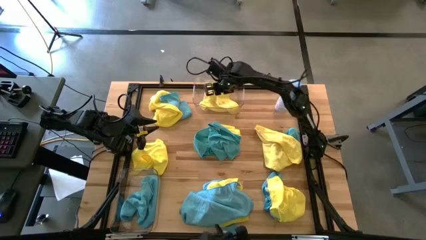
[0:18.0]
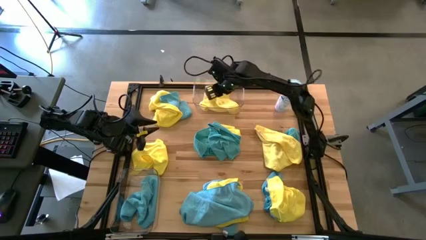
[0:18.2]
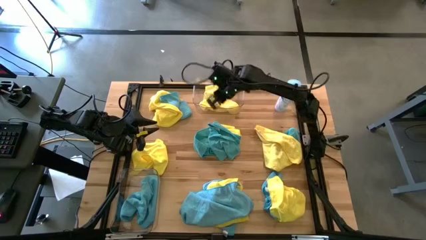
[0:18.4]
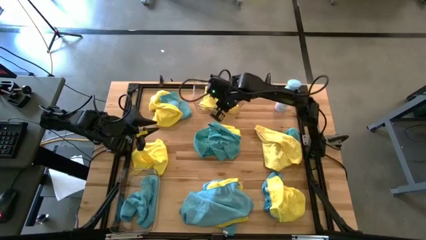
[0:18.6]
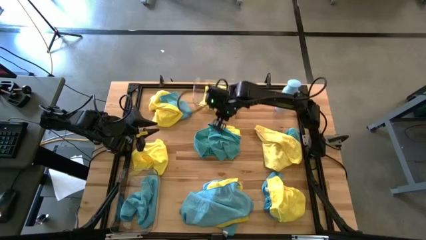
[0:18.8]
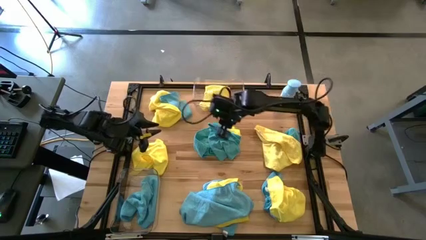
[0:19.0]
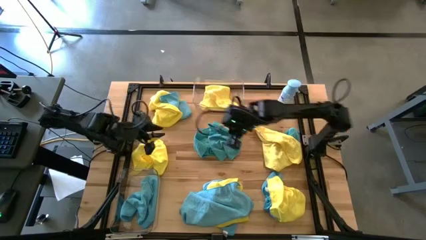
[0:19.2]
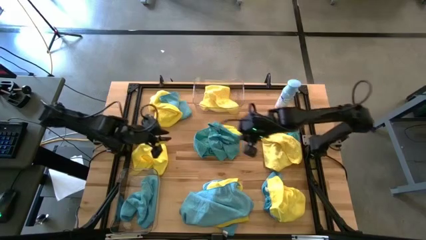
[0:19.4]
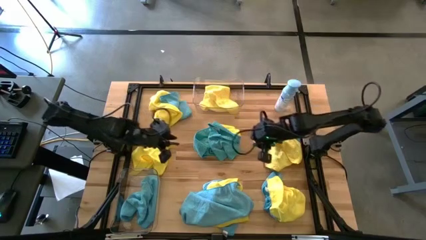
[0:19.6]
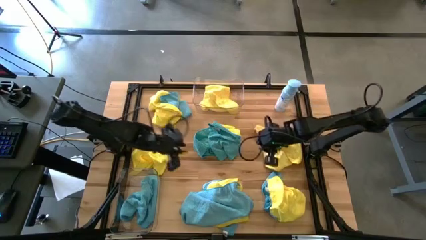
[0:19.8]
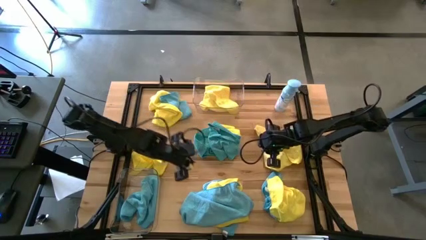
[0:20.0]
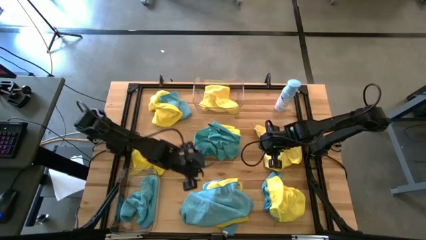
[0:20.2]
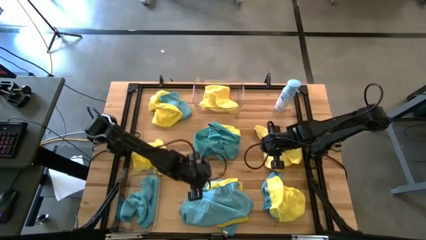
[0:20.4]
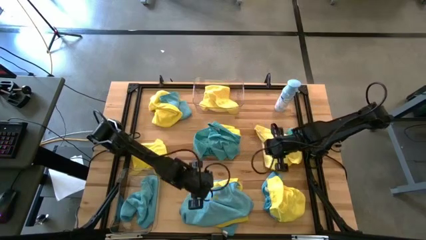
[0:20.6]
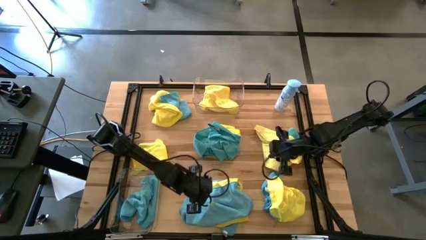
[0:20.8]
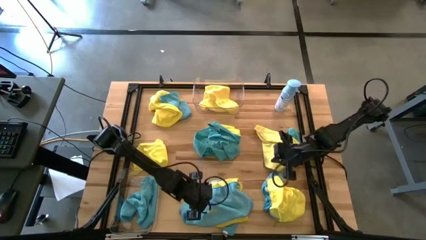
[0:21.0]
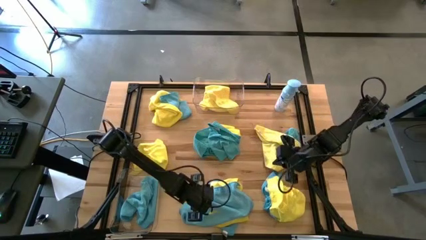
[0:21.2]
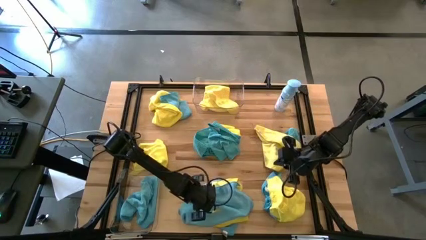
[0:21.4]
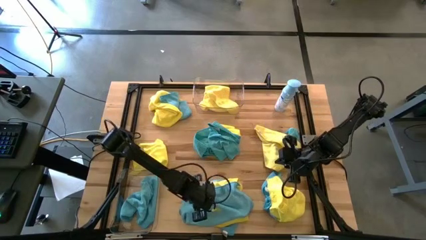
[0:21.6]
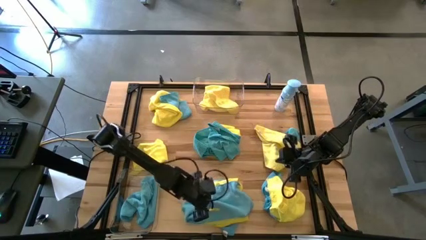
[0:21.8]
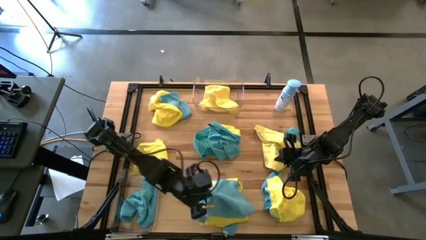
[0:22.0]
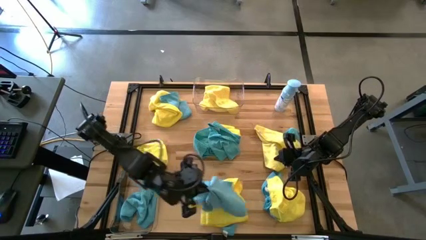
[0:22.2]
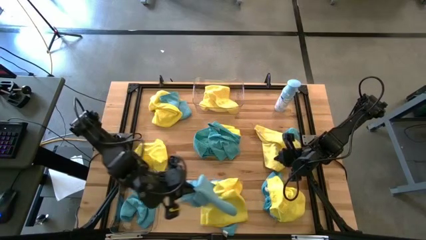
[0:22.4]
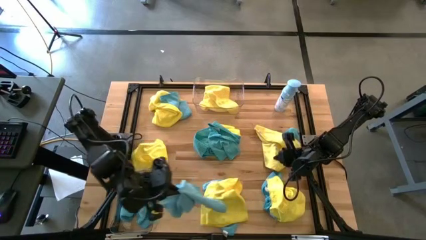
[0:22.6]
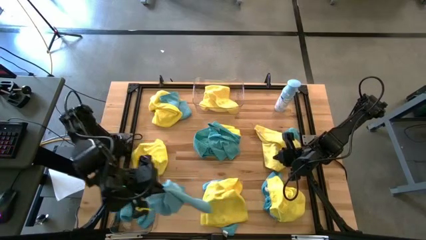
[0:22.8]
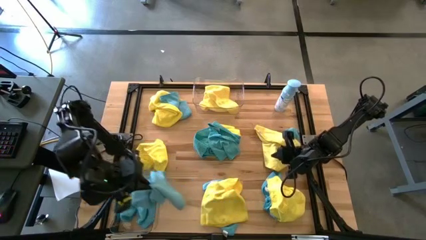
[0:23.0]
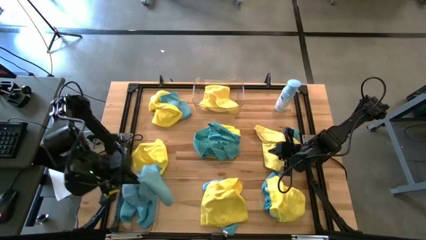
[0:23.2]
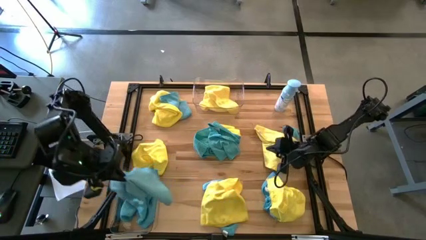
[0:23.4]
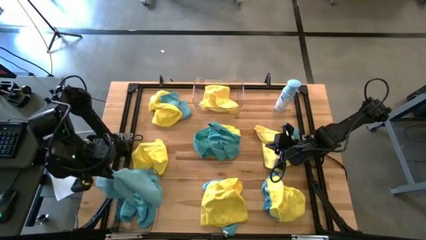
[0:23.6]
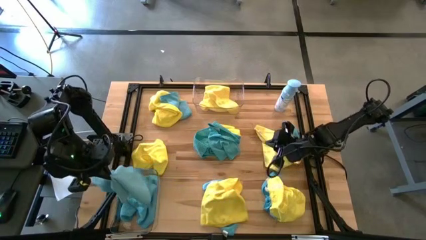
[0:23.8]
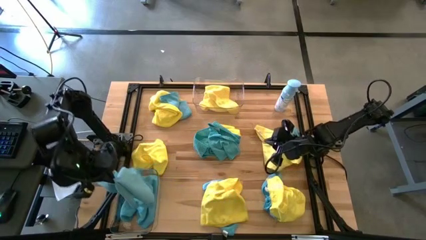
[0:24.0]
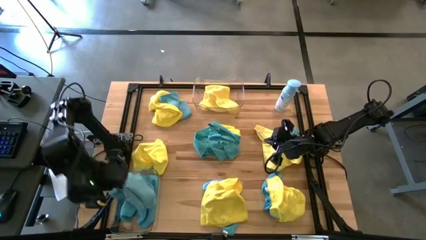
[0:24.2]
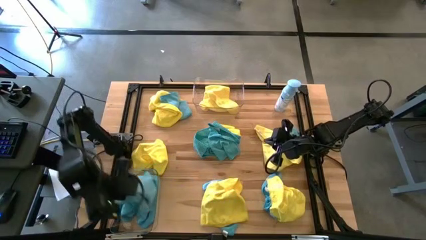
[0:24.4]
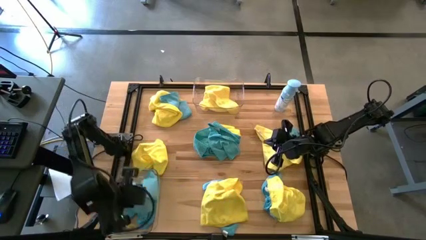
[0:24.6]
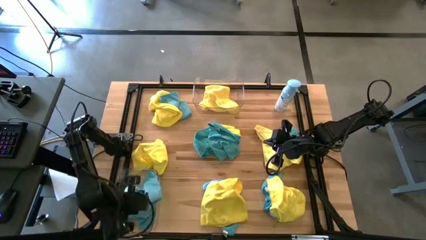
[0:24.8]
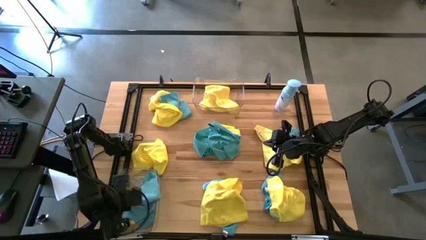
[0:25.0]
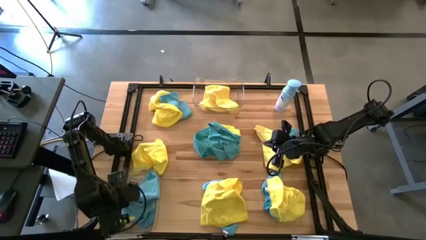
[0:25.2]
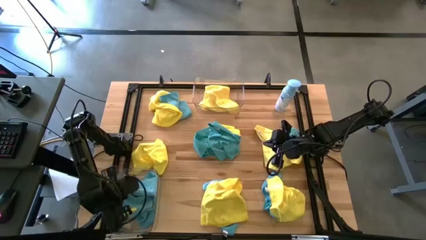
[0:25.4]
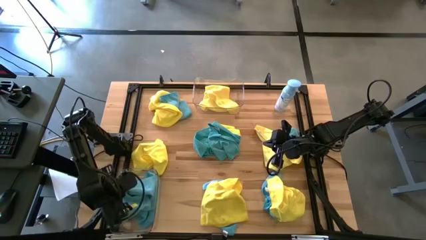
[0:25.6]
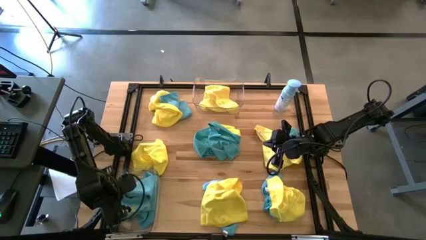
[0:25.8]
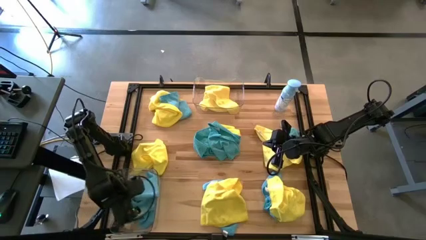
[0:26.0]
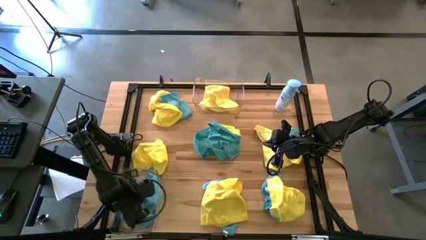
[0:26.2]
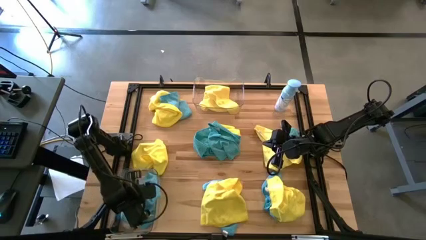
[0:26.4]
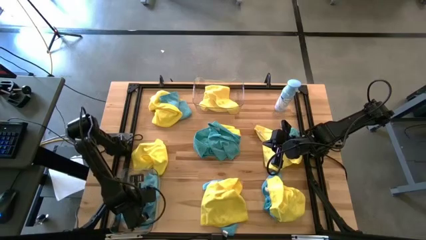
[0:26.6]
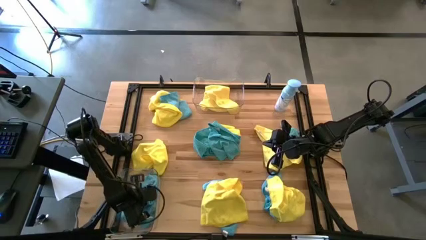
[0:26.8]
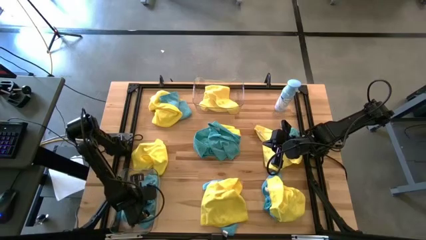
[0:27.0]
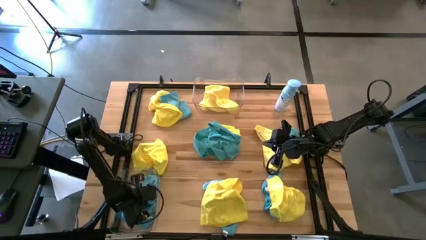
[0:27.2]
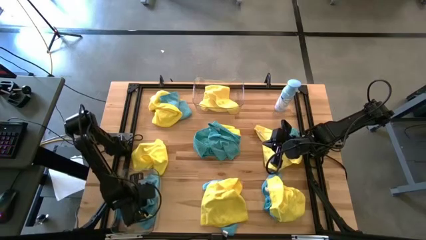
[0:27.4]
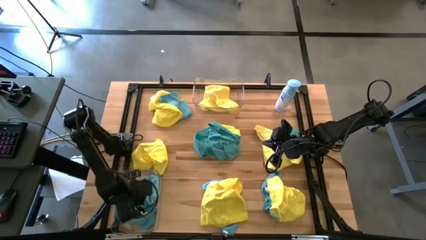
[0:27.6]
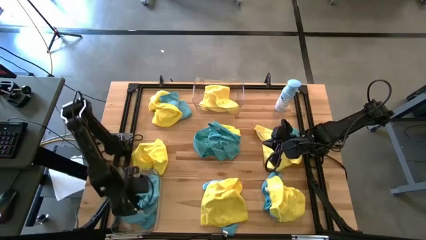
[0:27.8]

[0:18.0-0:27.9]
Task: Sort microfiber towel by color & place in baskets
Put the blue microfiber towel into the bottom transparent bin

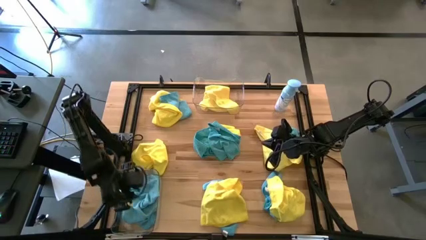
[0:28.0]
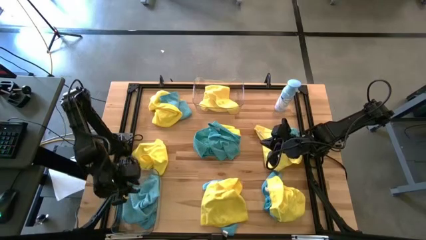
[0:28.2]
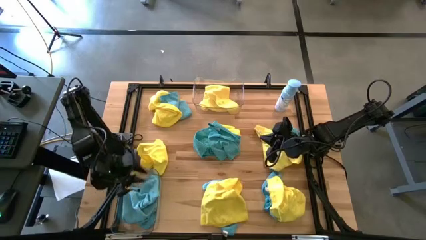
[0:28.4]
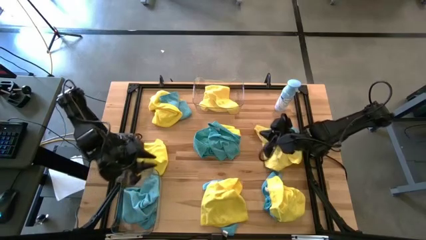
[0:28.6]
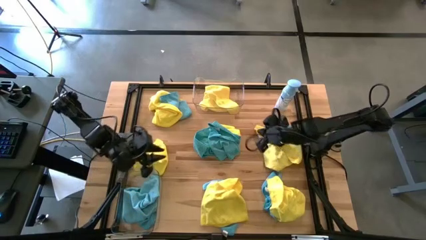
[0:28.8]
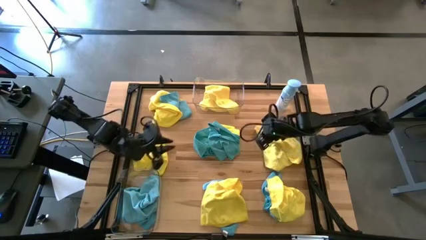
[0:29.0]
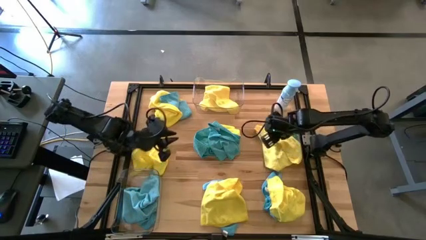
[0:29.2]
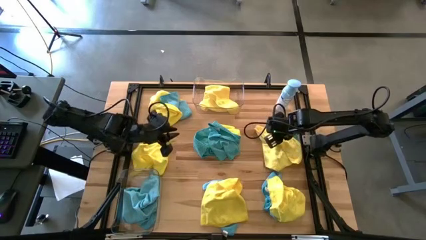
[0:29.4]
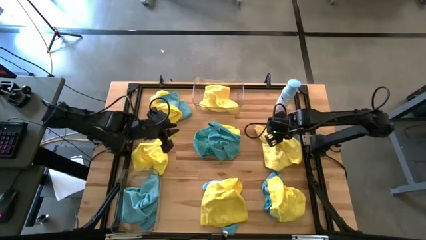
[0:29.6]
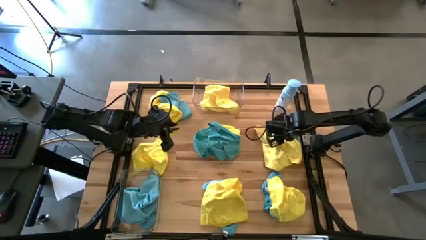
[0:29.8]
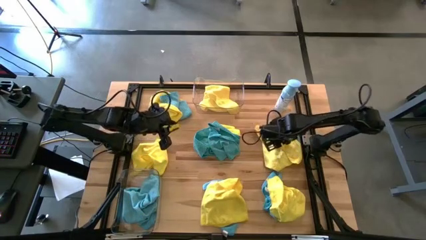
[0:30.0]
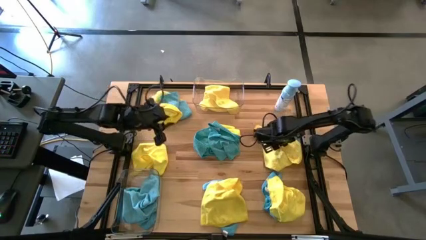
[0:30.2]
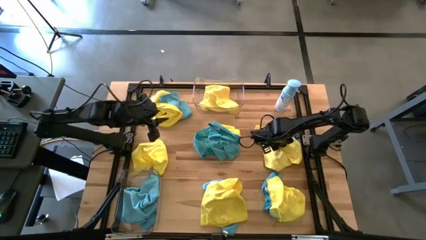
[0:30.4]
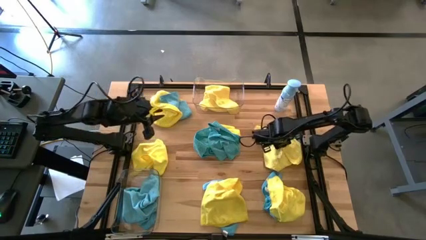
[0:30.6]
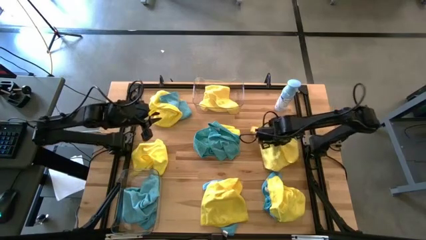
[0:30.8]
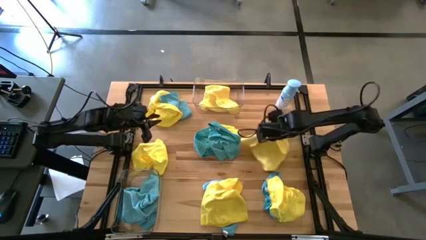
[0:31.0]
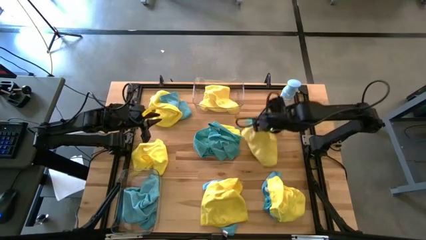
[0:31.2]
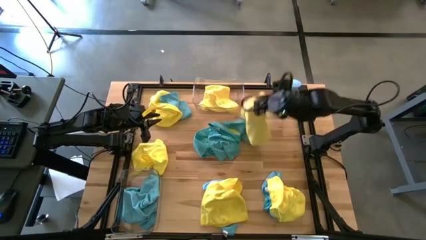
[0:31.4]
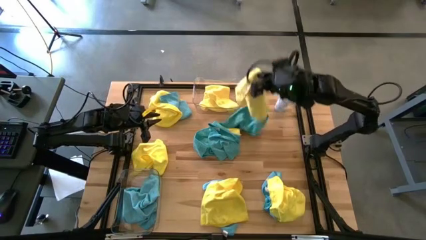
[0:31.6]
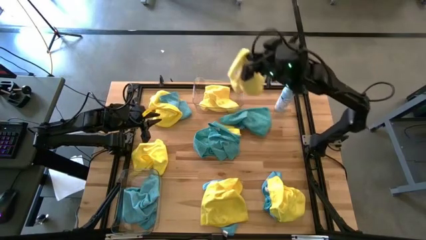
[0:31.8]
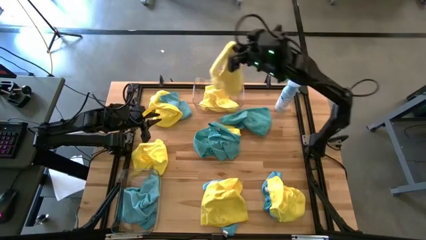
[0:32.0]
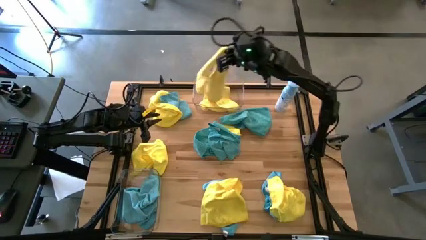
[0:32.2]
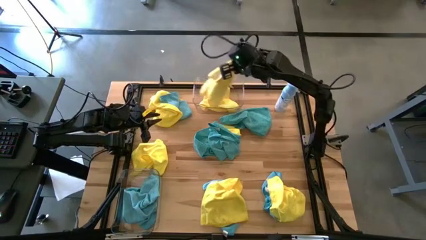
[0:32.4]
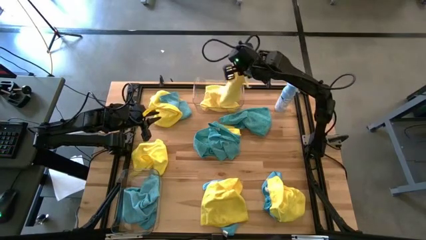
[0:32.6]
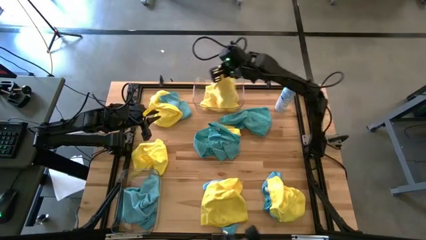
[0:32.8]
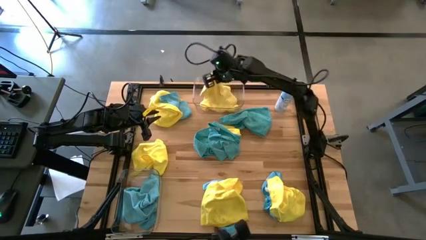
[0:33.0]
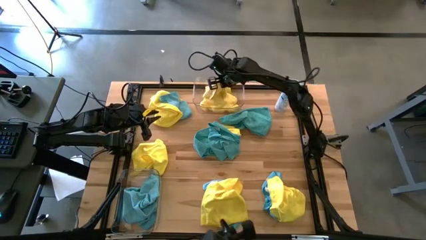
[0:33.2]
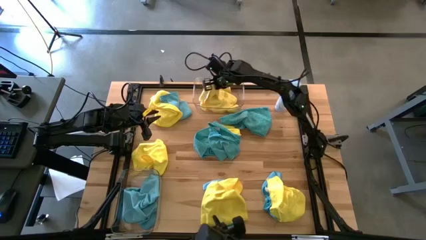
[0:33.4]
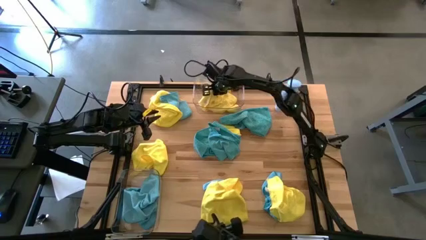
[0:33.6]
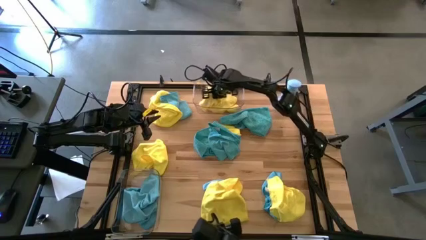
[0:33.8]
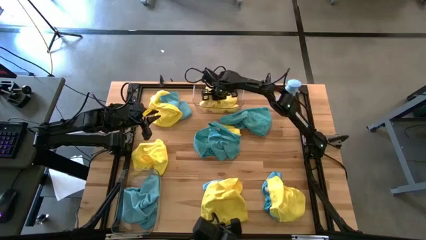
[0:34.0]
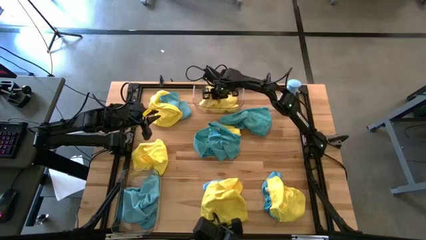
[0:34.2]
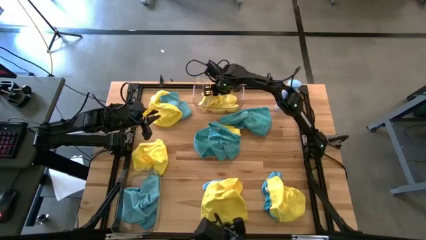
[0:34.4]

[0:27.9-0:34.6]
Put the yellow microfiber towel into the top transparent bin
